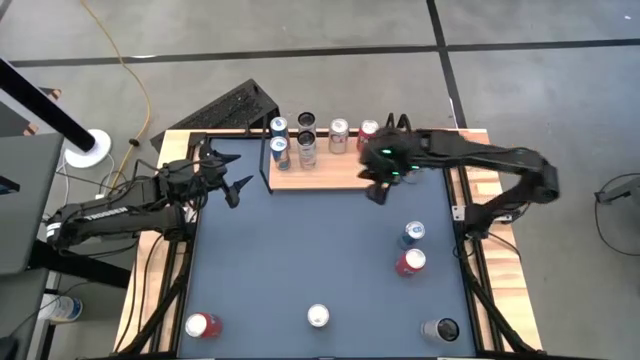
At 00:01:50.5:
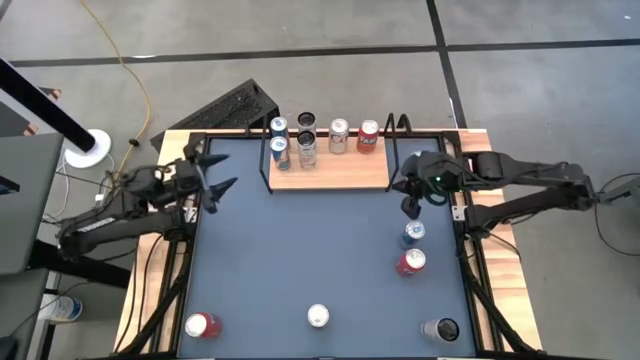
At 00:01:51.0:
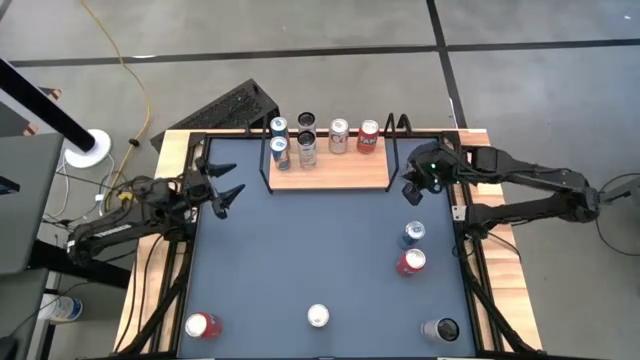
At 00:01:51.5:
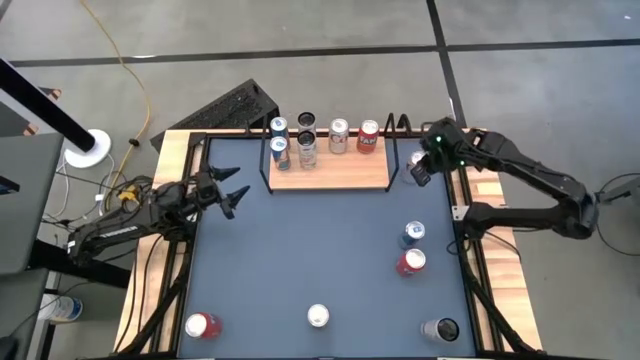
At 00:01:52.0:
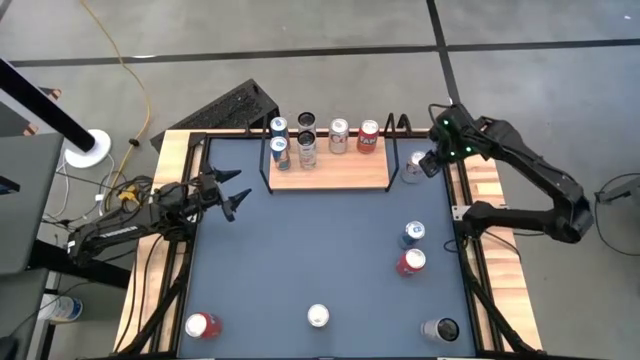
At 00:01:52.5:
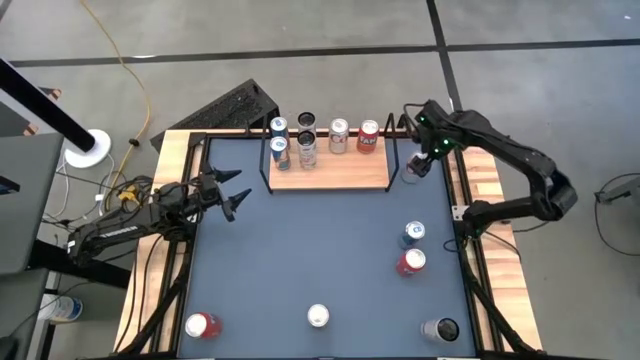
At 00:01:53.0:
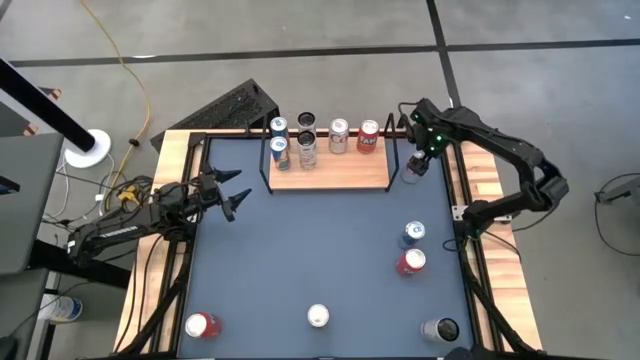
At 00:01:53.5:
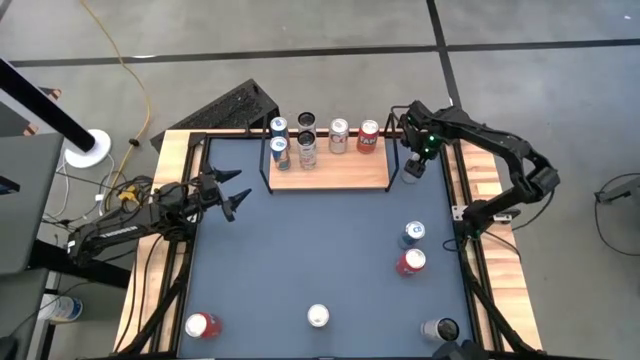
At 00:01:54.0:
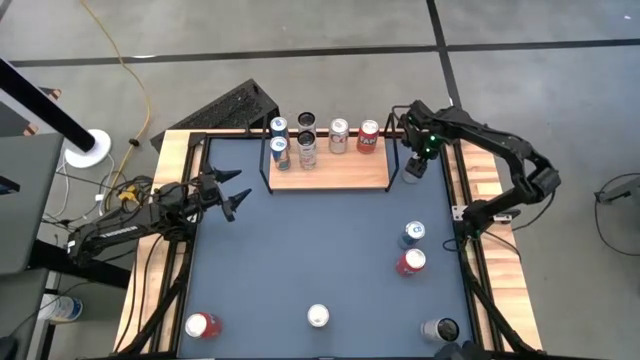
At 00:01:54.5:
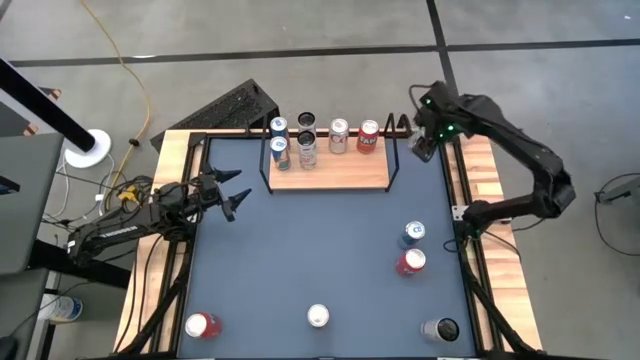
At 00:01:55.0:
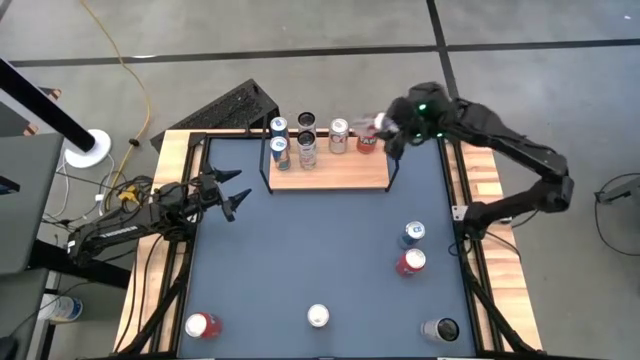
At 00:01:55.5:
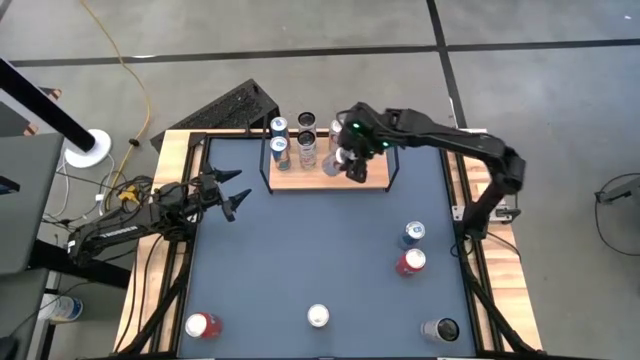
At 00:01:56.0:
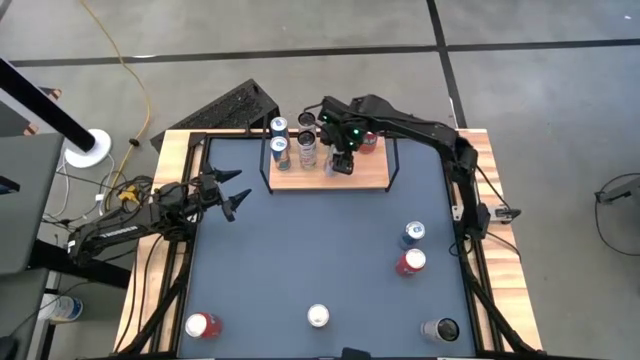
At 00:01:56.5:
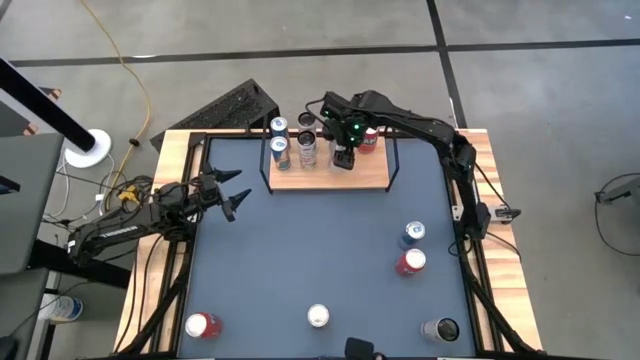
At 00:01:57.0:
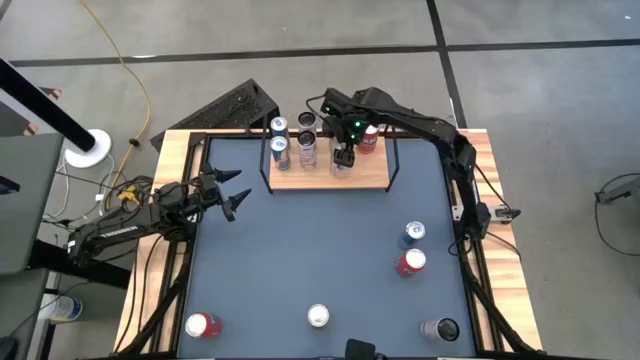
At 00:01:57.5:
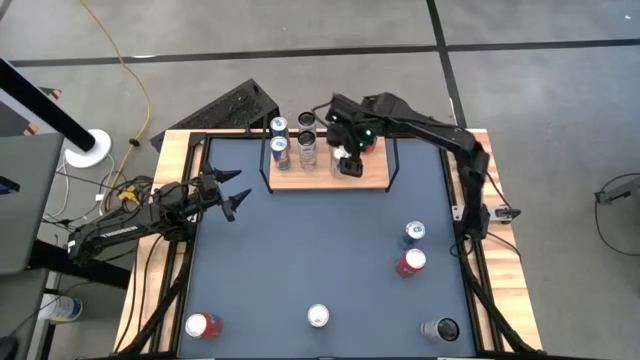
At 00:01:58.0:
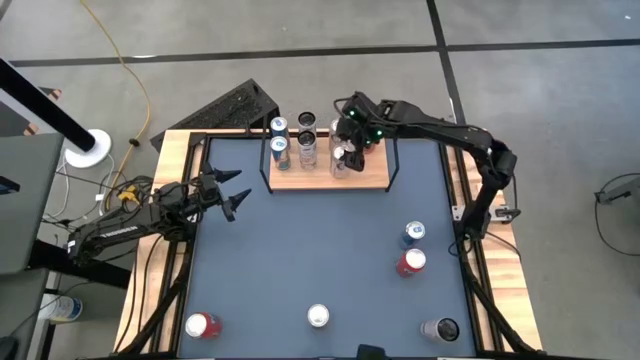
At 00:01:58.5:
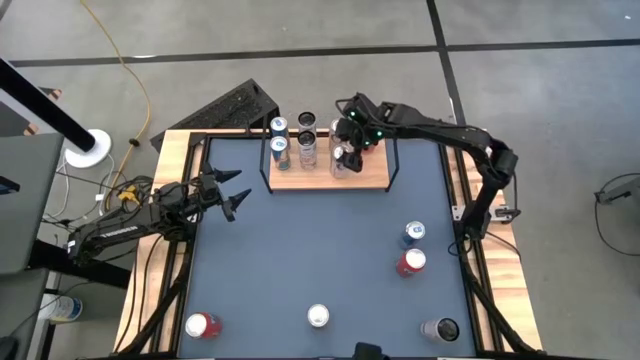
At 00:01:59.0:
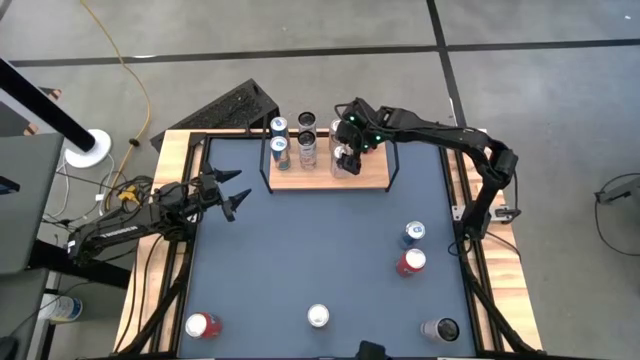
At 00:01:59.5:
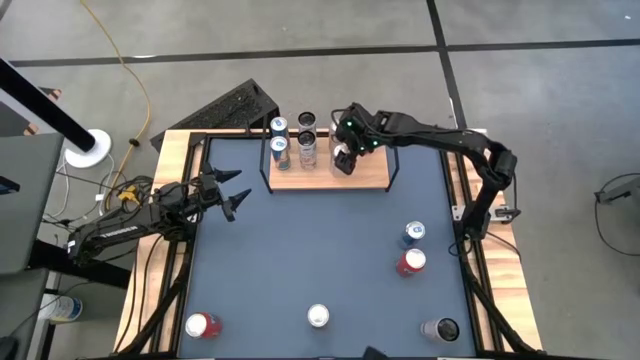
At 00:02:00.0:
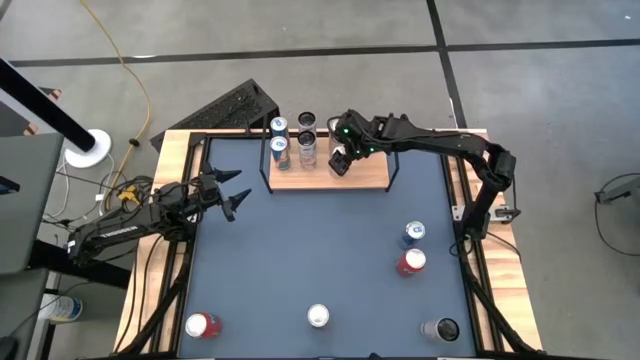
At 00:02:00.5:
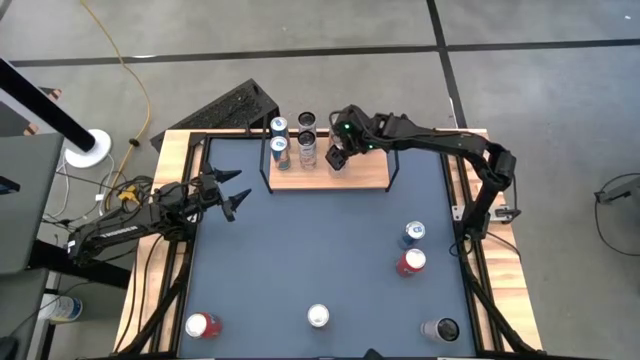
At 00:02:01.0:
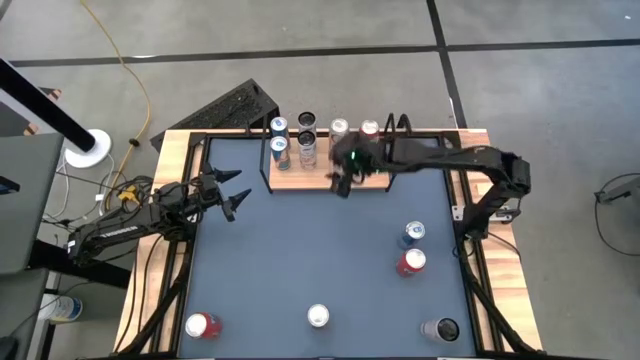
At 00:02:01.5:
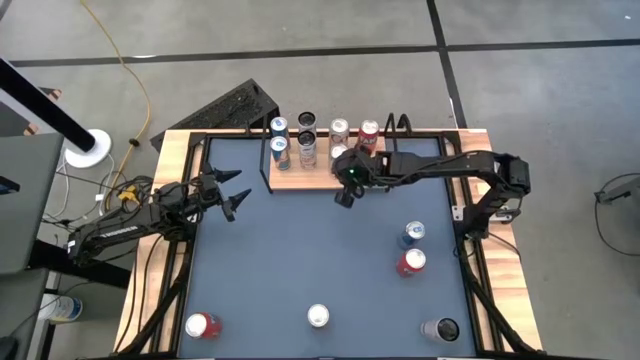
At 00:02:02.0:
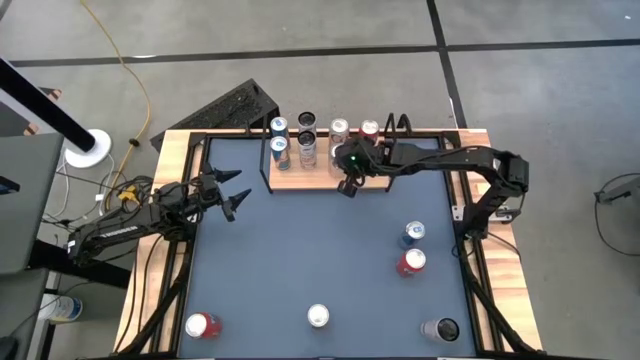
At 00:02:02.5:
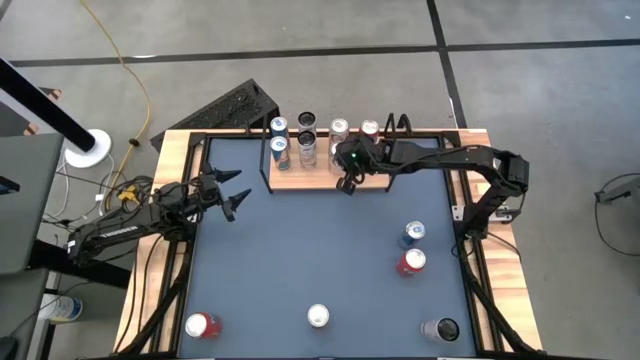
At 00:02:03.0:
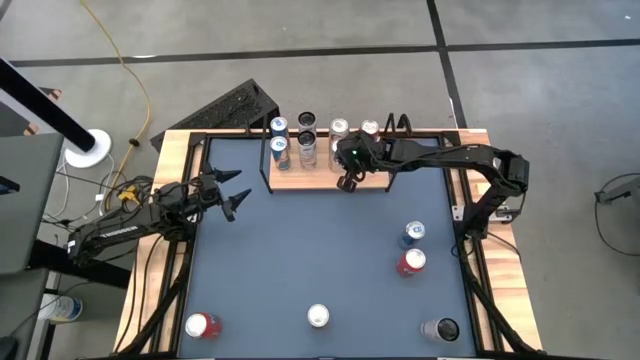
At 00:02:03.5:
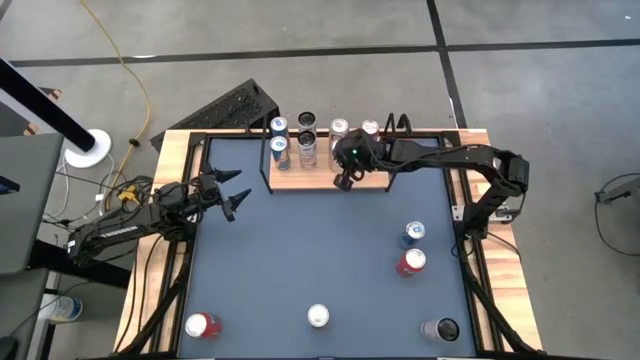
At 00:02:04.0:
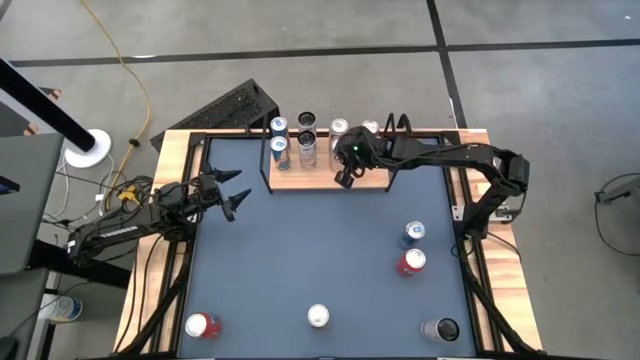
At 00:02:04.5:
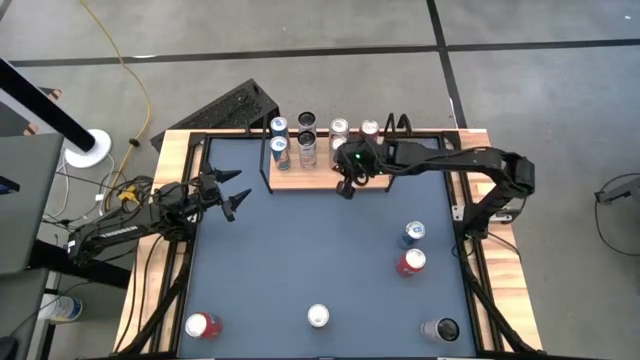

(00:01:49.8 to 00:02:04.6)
Task: Place canned beverage on shelf
Put the top silver soda can onto the shelf aligned with the other silver soda can

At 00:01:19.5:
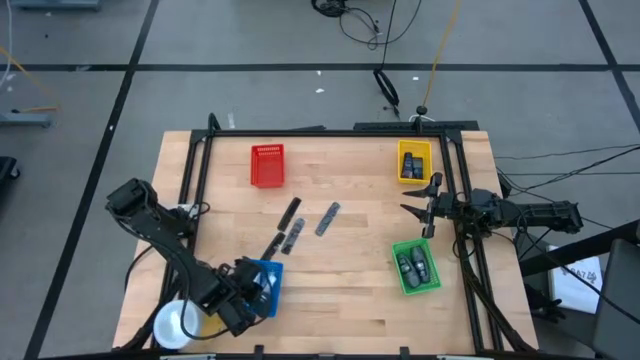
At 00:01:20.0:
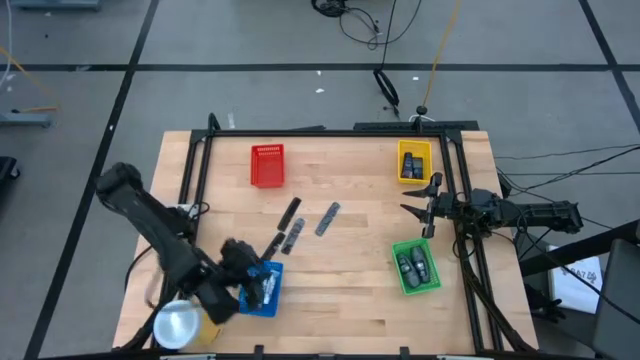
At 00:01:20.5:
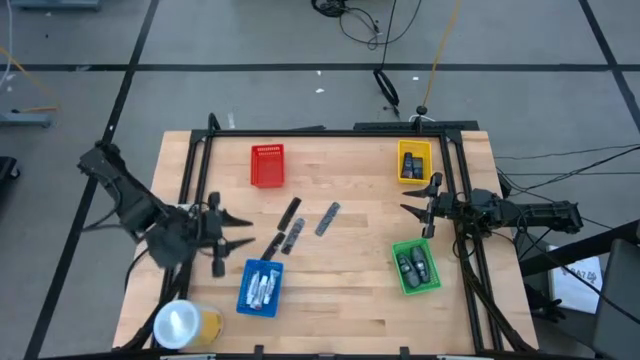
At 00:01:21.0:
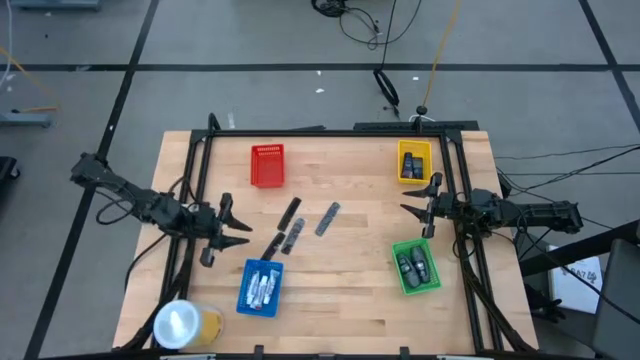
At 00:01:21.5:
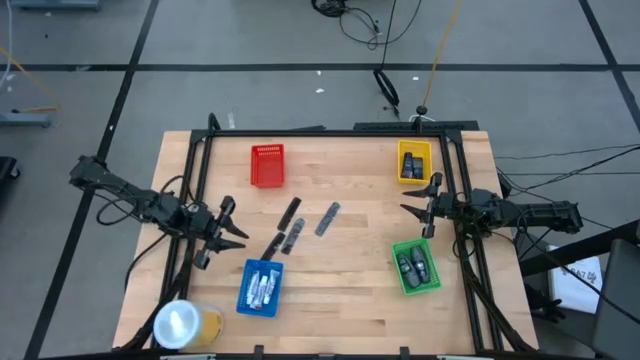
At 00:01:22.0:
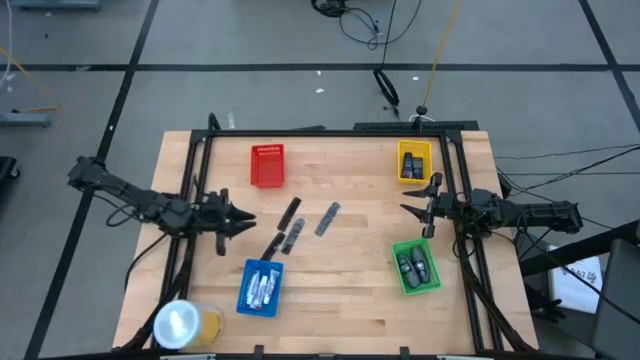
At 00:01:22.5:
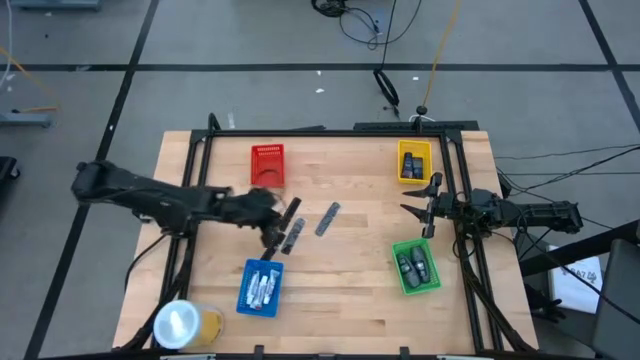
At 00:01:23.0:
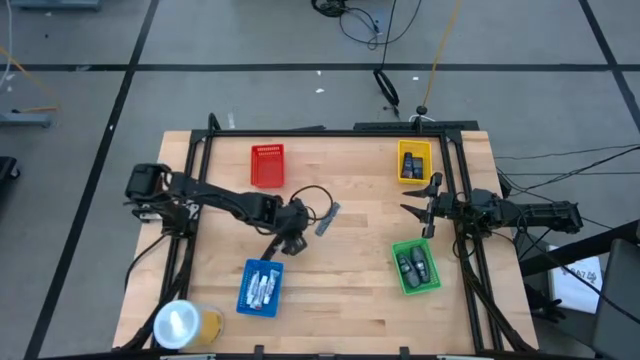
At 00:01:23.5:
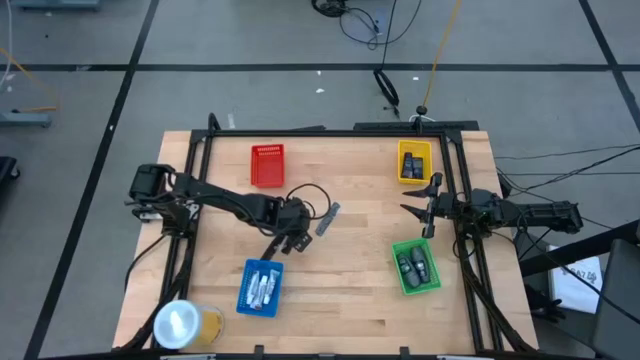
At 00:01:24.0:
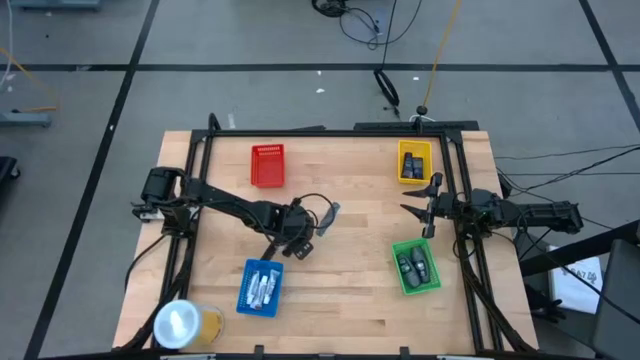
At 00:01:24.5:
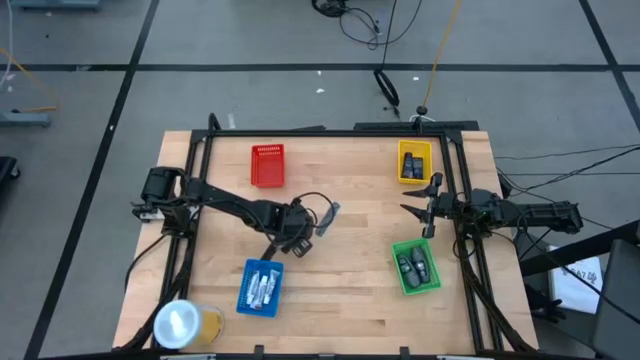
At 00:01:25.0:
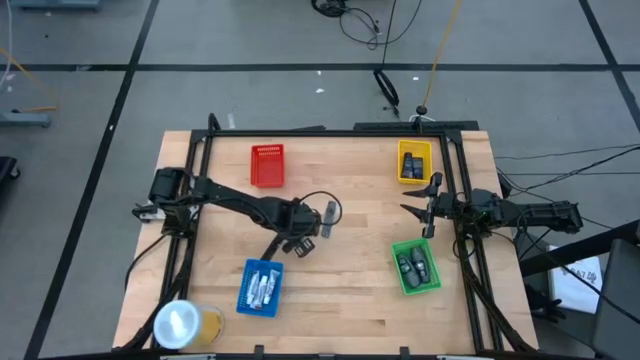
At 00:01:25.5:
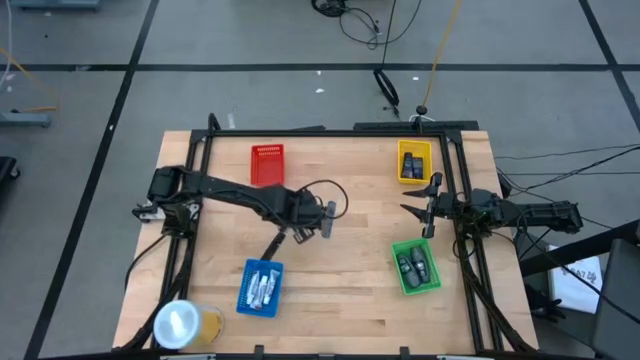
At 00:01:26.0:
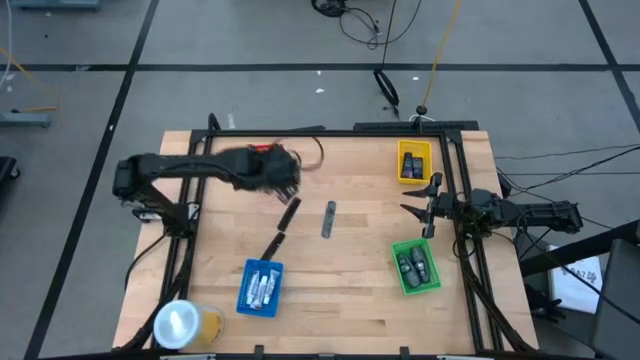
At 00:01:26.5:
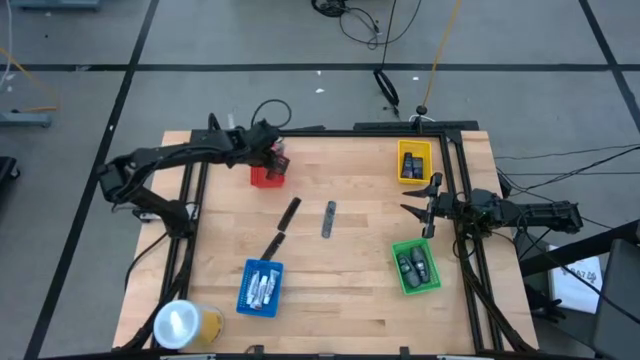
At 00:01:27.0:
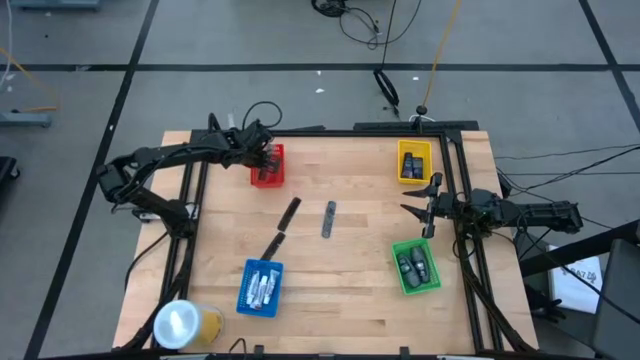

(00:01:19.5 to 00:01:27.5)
Task: Pick & Place Travel size toiletries
Put the bottom right black comb in plastic wrap into the orange basket
